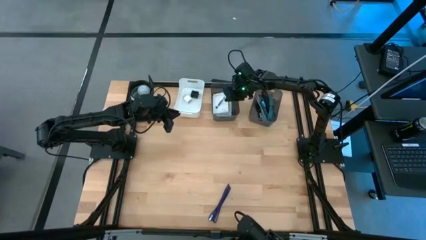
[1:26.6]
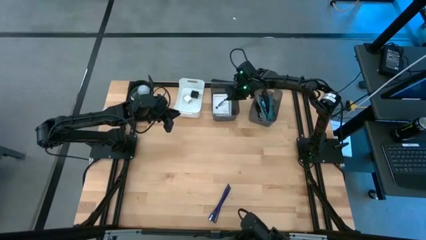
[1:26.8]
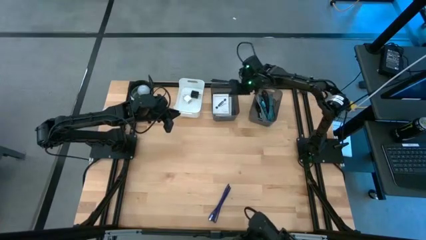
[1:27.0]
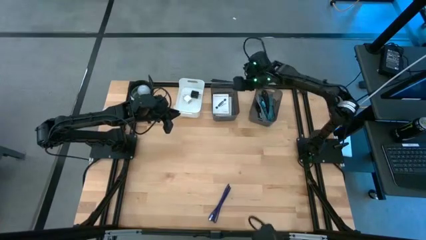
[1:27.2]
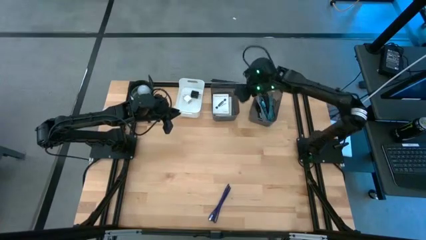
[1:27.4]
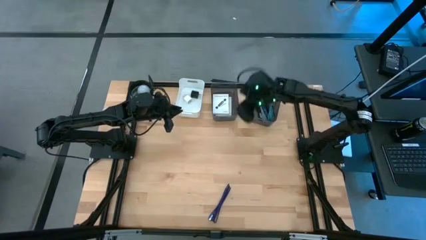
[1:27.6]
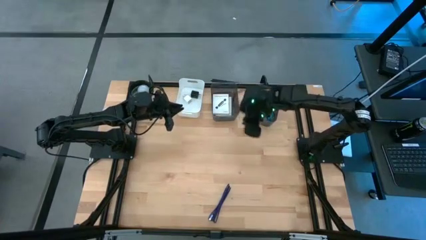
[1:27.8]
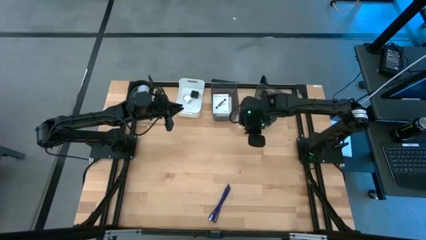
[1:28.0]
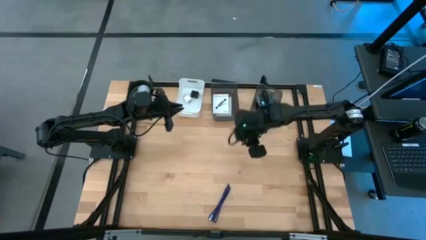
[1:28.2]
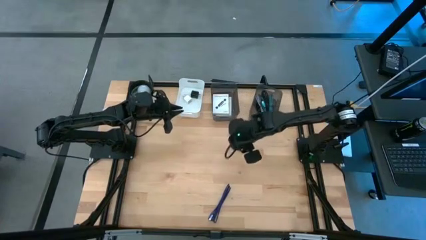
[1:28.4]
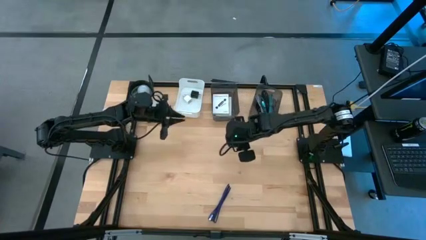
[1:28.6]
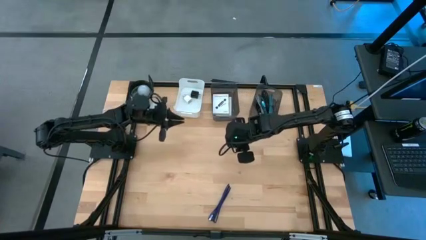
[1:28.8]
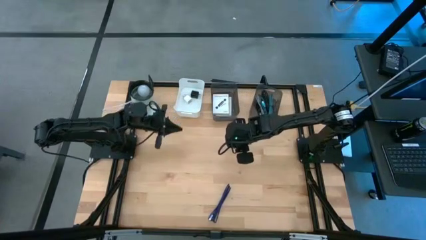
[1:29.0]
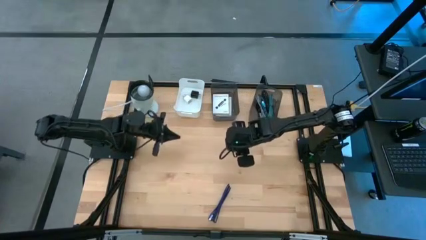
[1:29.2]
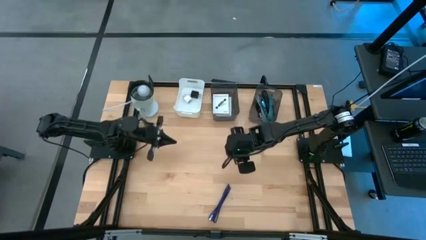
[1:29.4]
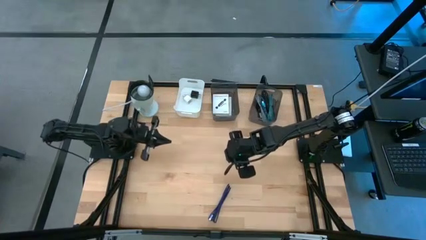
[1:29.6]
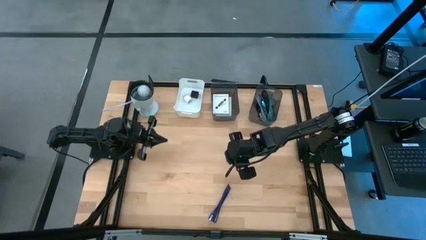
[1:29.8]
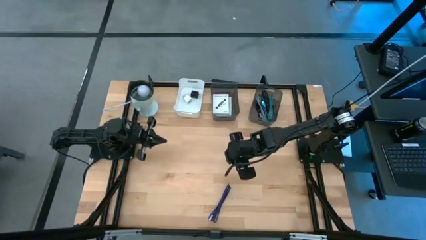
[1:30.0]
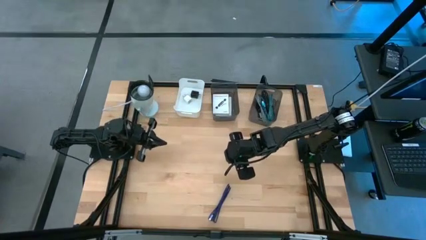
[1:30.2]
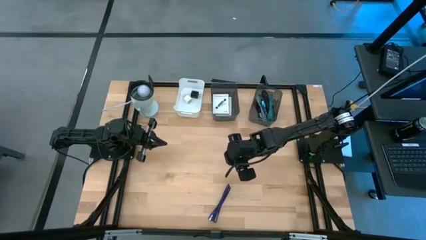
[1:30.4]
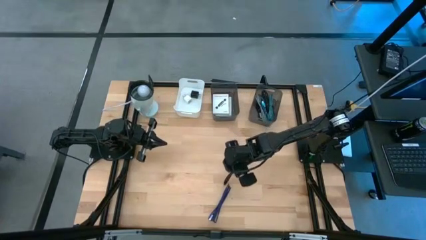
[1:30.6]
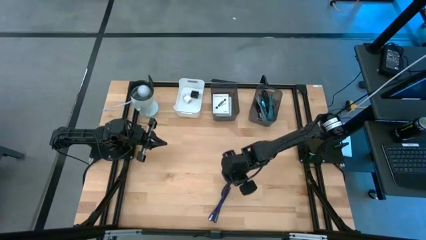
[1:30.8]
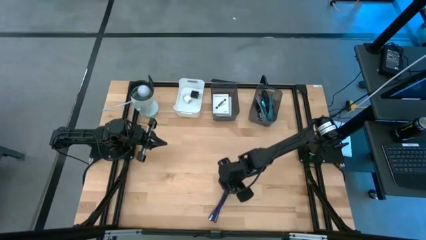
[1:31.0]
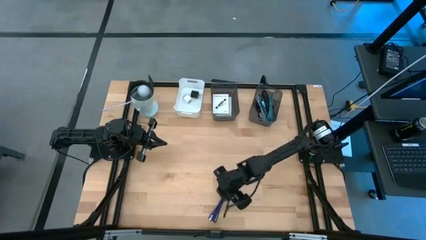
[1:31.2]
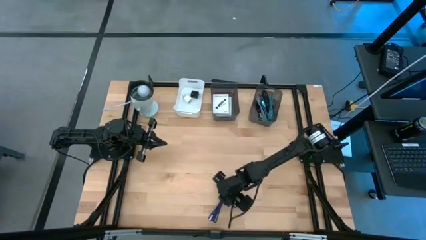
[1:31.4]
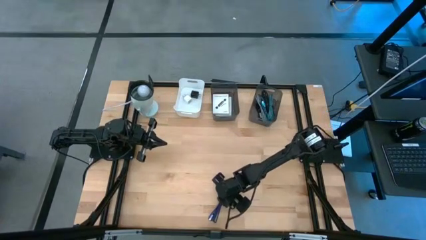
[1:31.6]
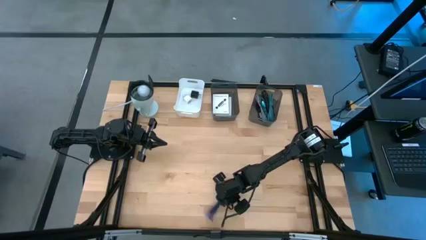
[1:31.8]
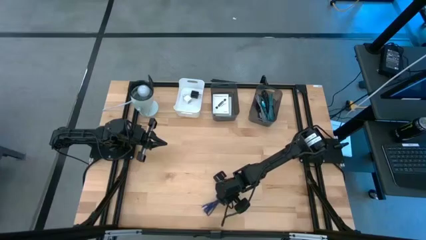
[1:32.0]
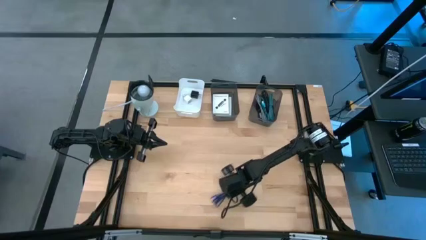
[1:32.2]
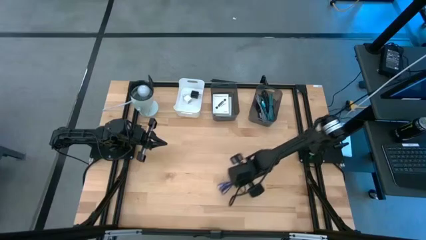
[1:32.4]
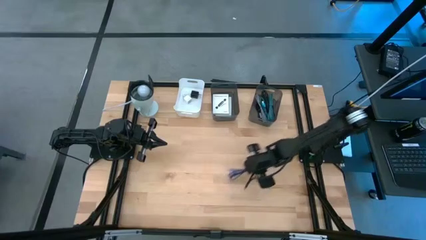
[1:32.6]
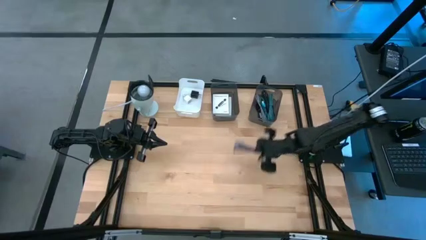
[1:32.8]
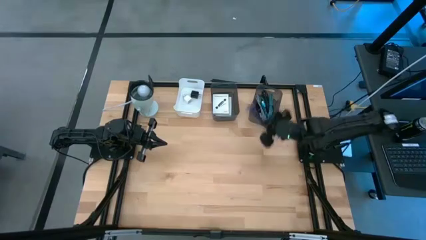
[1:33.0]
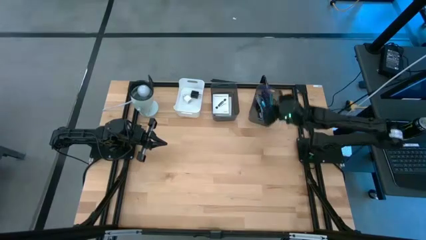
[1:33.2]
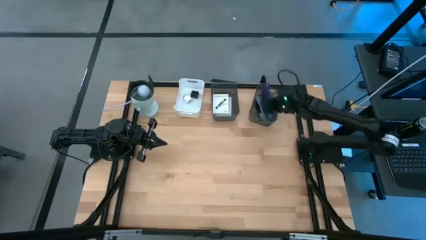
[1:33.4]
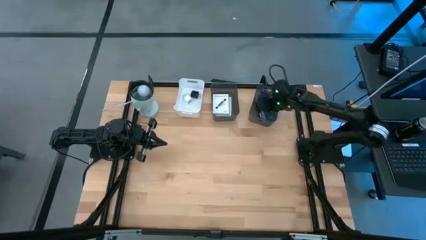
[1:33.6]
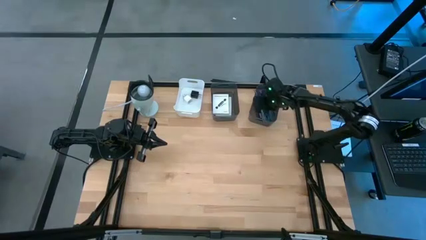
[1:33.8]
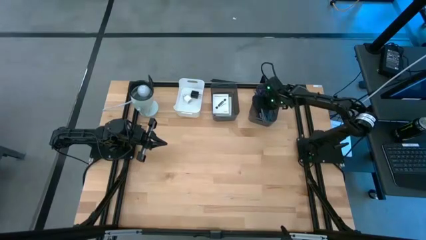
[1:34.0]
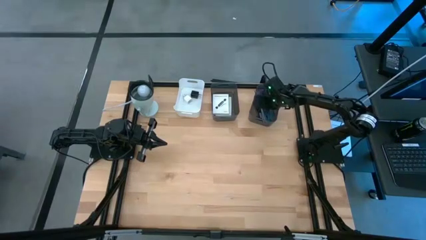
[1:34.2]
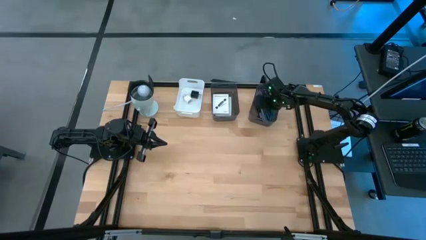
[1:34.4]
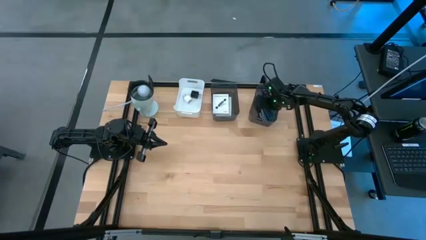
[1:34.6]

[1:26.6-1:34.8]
Task: Pick and place items into bin
Put the violet charger cable into the right black bin

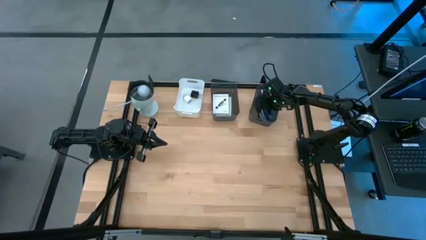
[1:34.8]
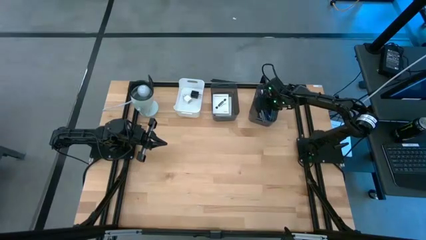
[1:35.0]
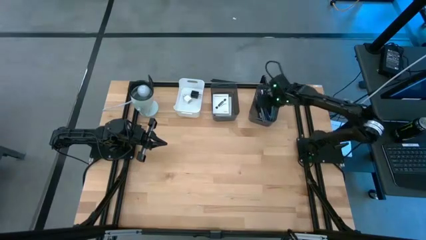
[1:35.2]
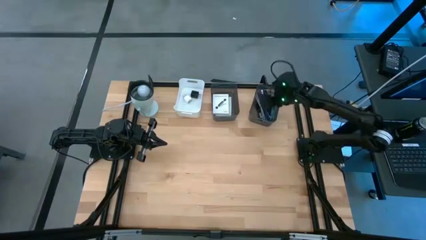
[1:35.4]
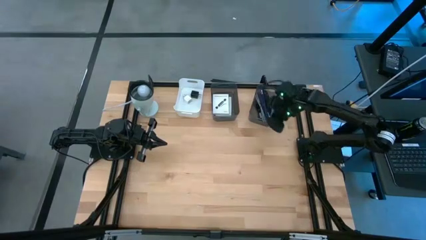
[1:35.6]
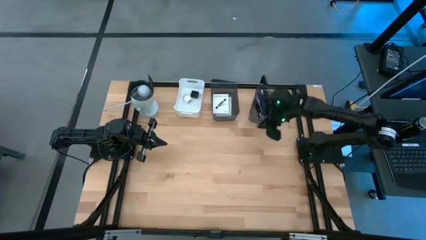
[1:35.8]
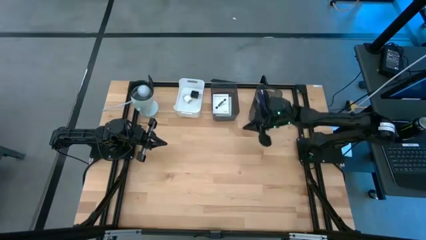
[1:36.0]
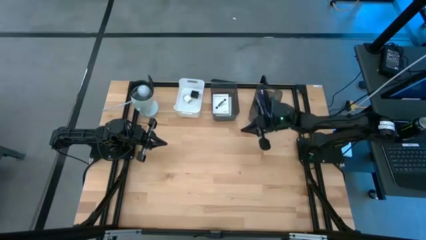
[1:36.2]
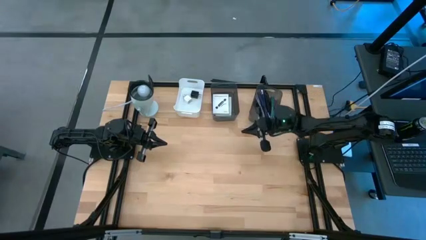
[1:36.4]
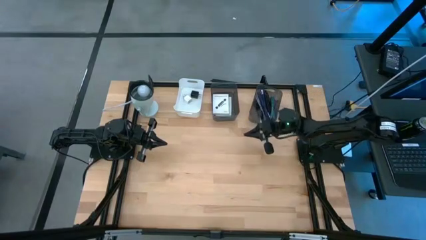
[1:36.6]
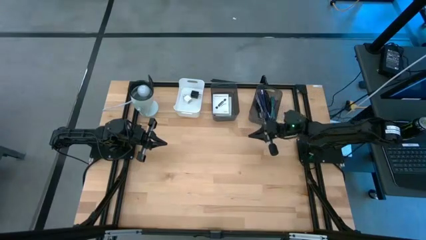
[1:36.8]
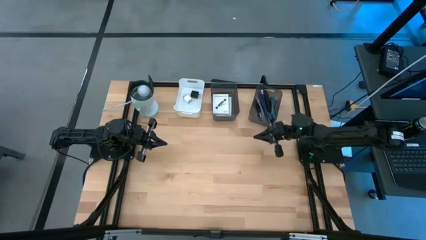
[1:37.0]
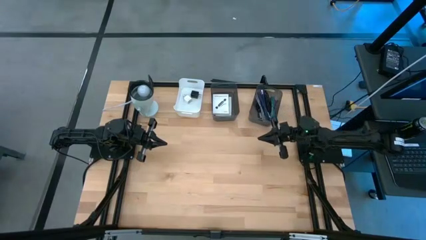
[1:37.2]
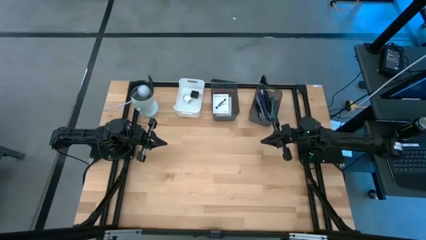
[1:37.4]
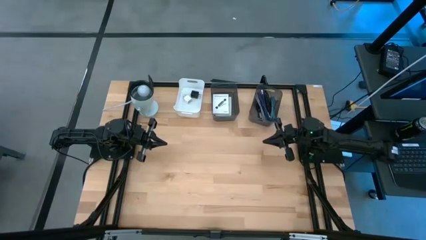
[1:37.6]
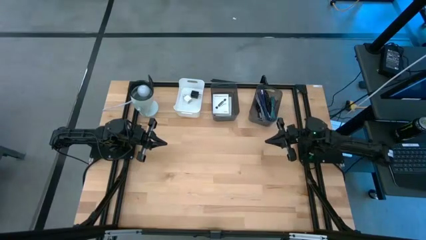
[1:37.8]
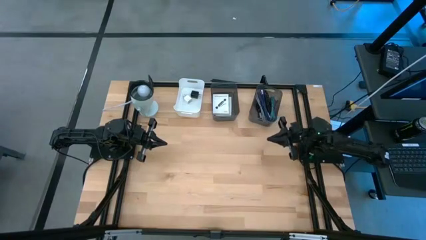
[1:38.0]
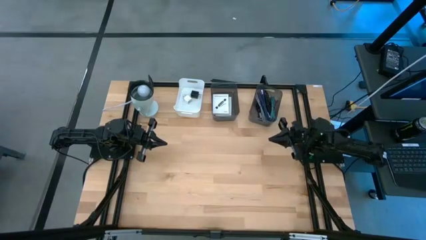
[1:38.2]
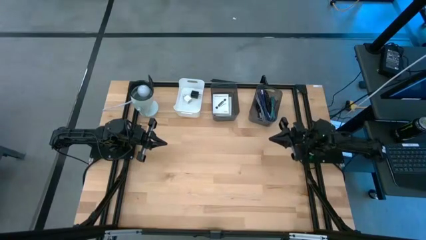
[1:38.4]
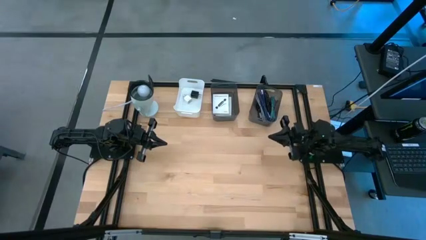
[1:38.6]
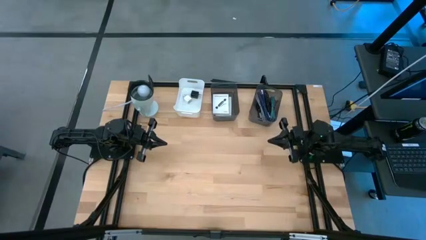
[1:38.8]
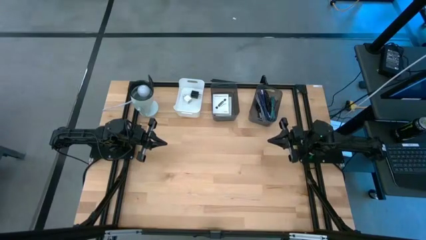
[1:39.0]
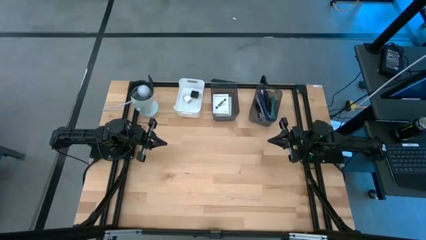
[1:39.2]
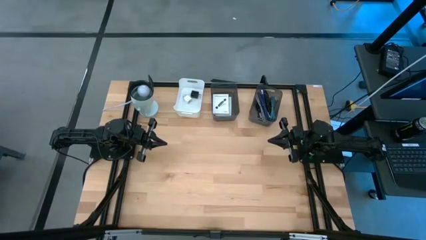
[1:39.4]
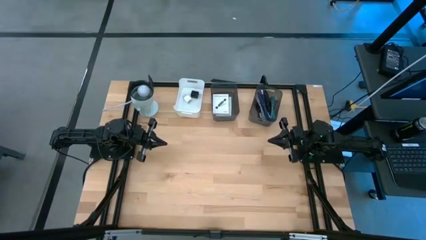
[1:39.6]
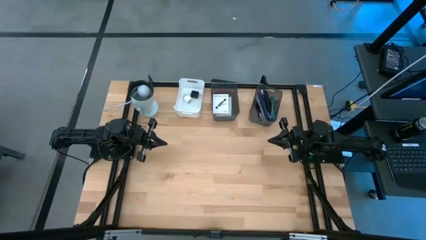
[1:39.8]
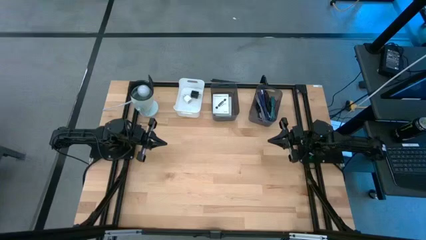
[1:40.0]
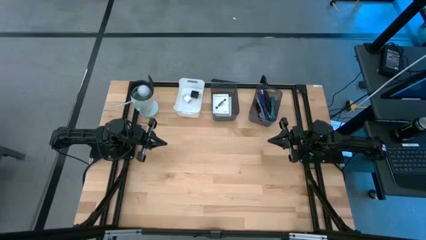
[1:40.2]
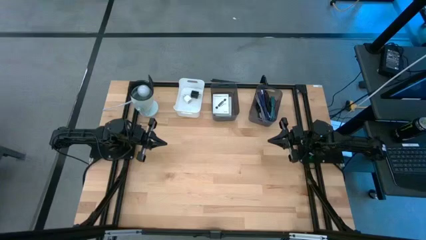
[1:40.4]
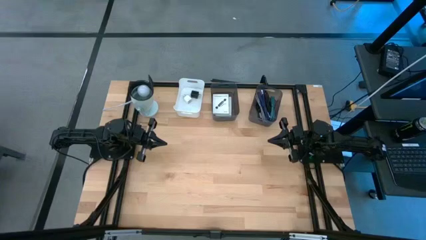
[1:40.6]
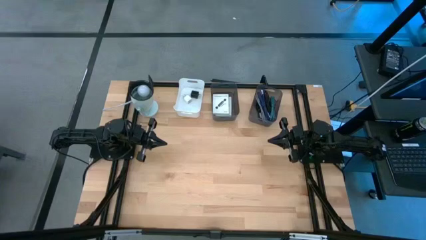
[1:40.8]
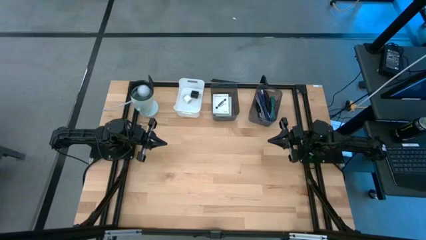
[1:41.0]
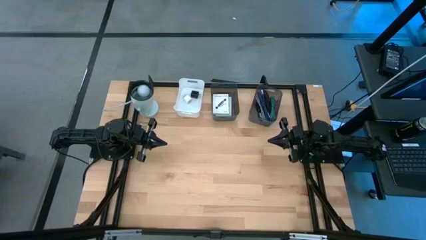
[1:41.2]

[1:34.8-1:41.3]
Return to Home Position

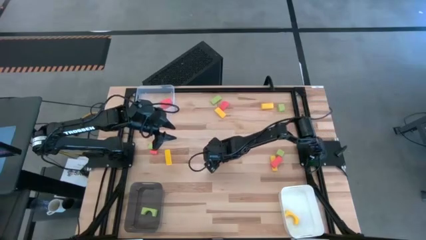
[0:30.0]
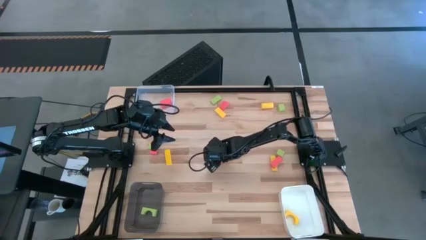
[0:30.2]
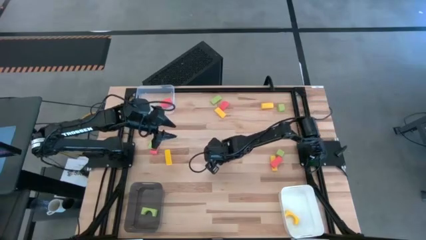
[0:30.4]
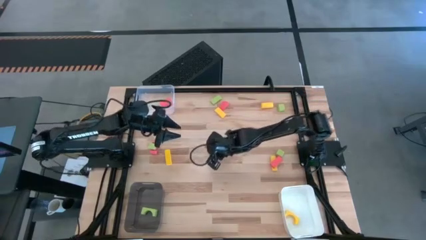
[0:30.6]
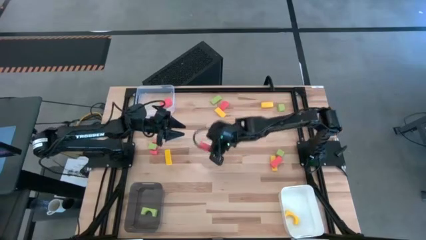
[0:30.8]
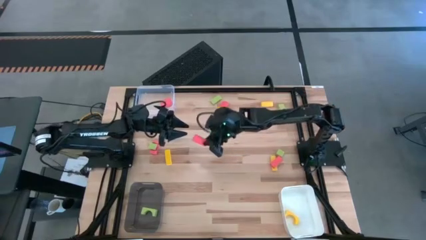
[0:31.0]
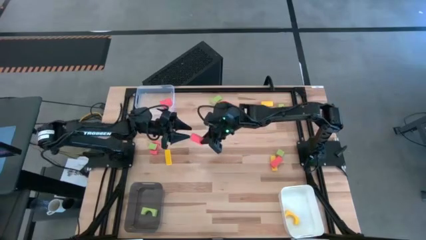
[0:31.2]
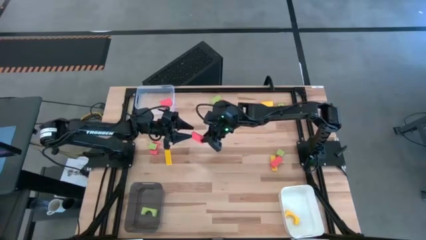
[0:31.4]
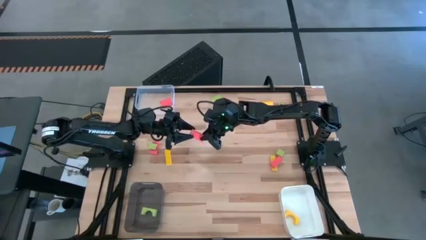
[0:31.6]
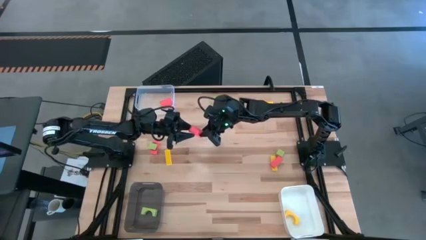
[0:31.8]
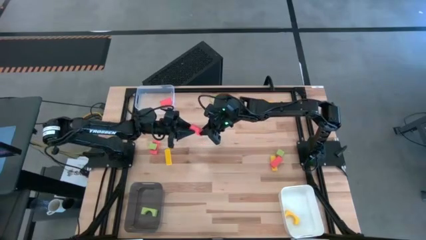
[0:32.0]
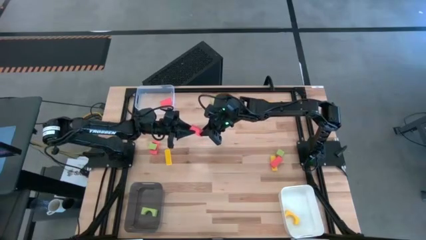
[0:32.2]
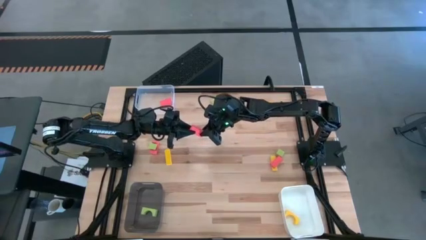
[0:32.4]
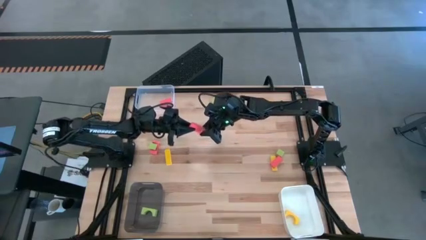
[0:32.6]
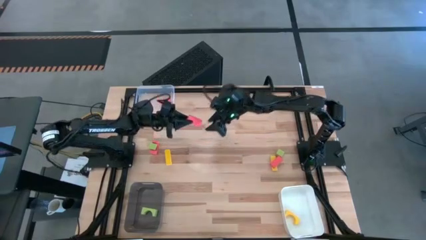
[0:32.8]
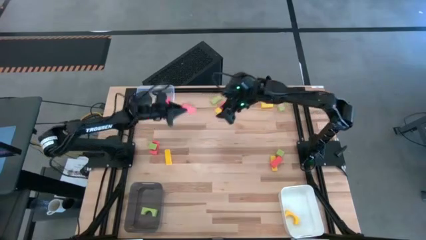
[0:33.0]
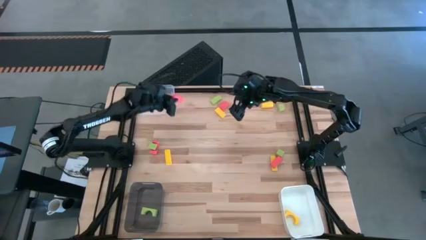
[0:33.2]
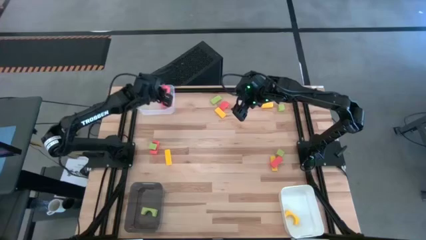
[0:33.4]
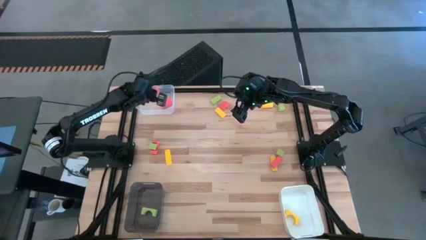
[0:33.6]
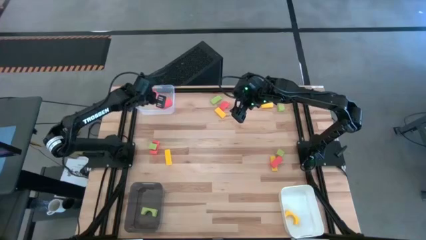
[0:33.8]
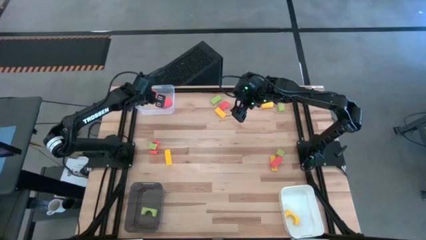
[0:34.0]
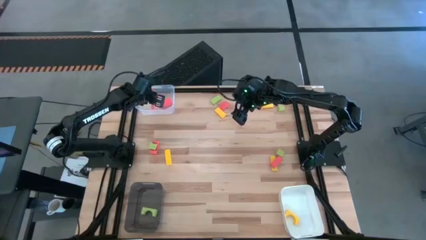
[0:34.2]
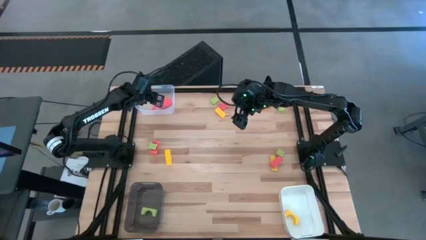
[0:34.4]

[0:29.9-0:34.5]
Task: Sort & place blocks by color
Put the orange block into the white transparent bin
